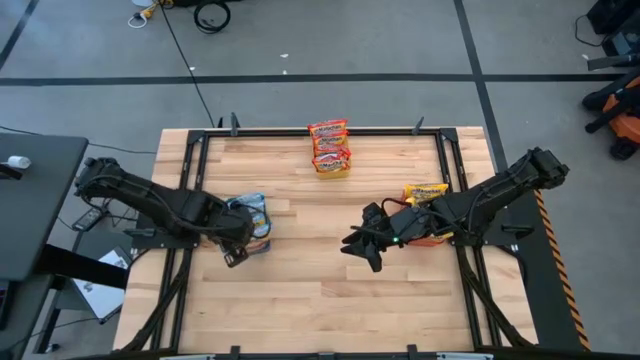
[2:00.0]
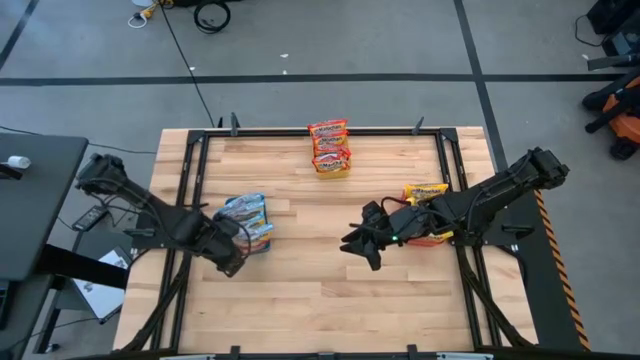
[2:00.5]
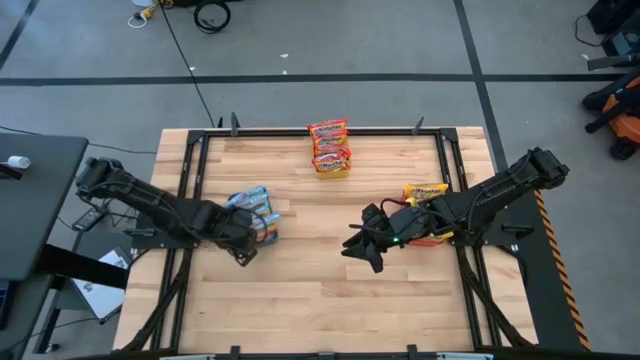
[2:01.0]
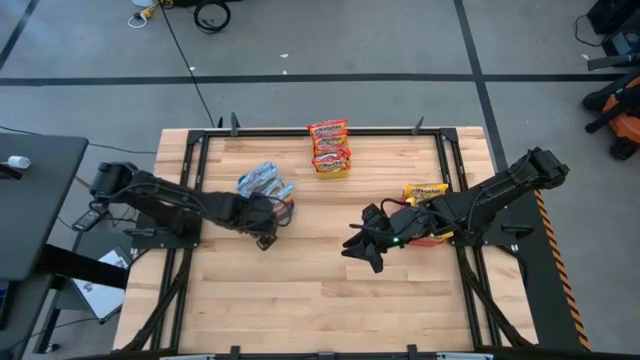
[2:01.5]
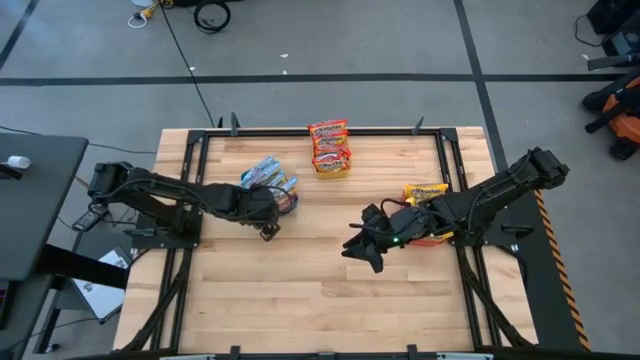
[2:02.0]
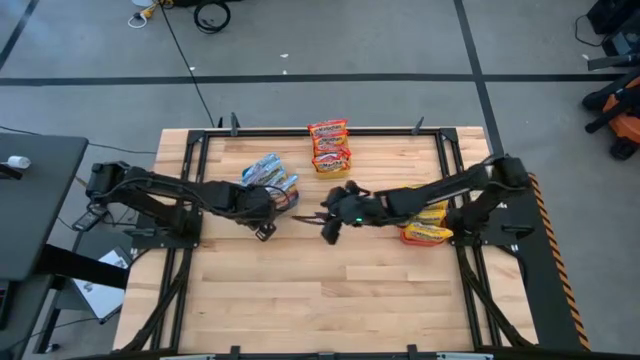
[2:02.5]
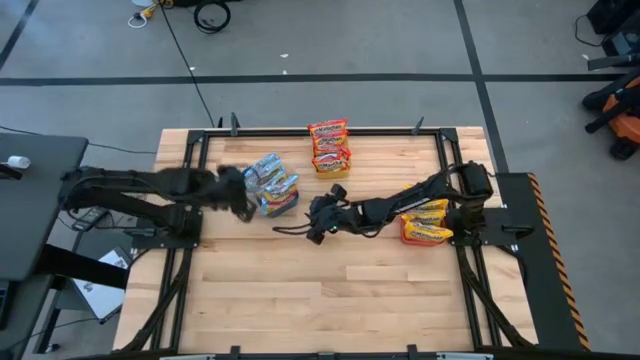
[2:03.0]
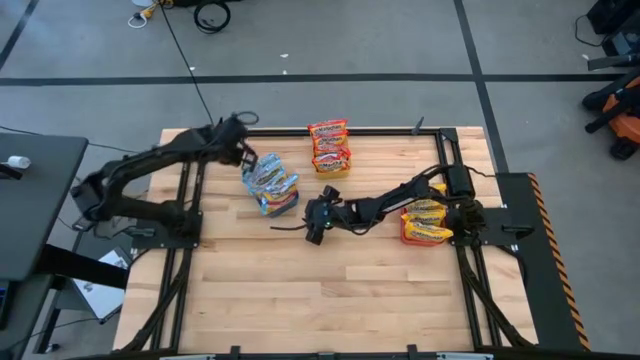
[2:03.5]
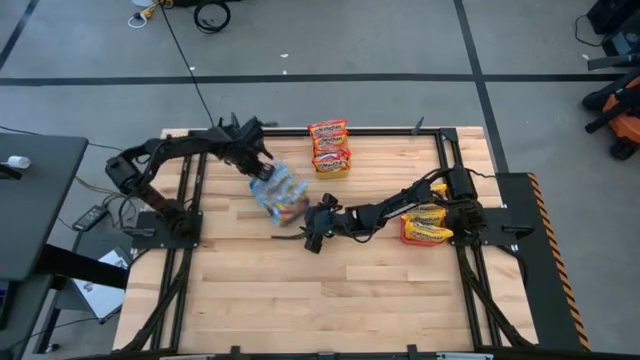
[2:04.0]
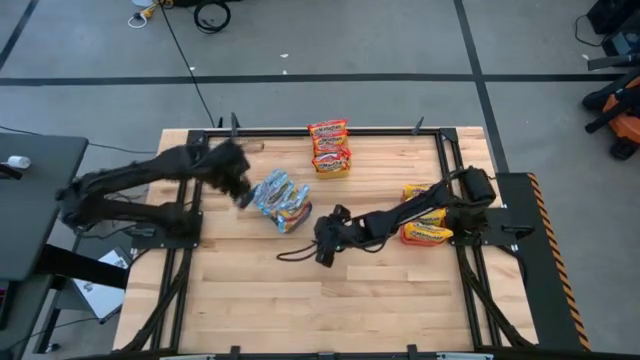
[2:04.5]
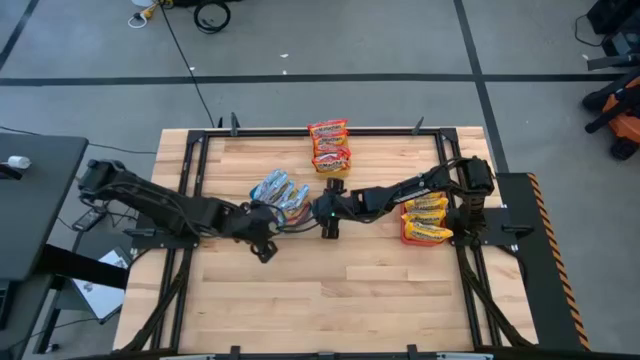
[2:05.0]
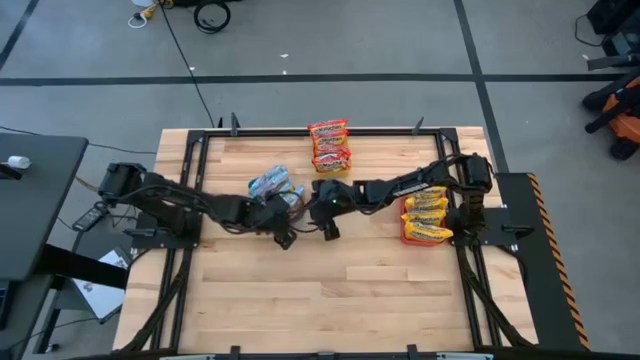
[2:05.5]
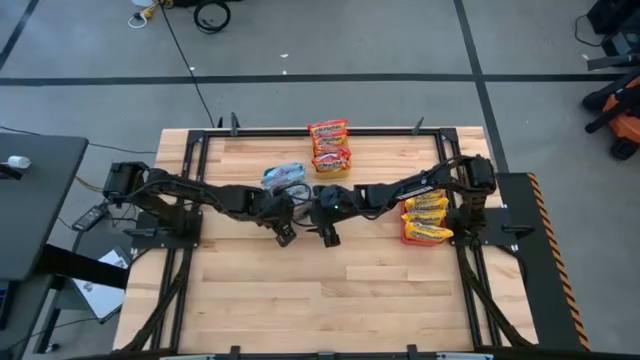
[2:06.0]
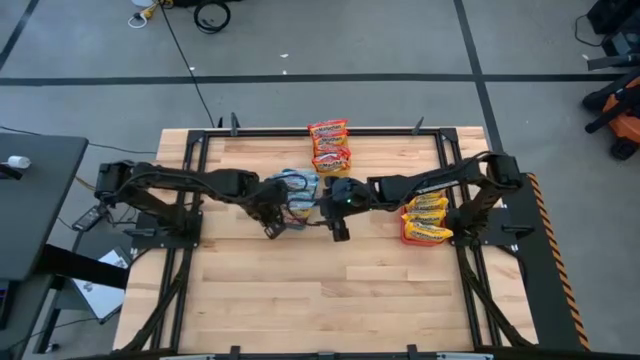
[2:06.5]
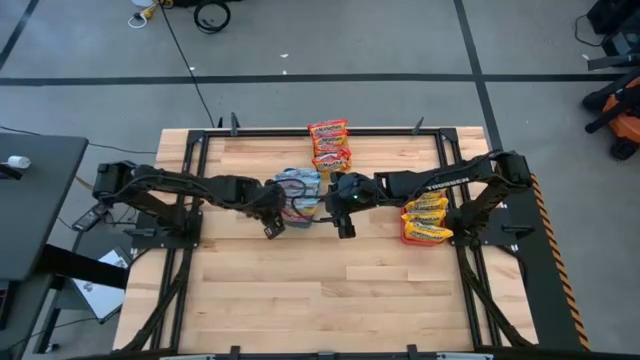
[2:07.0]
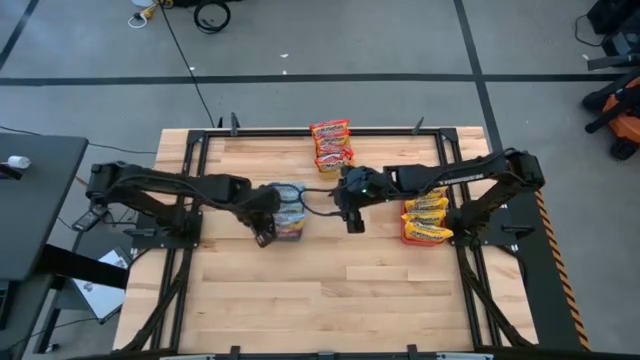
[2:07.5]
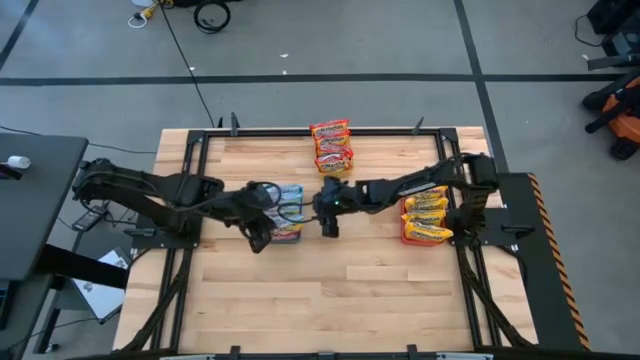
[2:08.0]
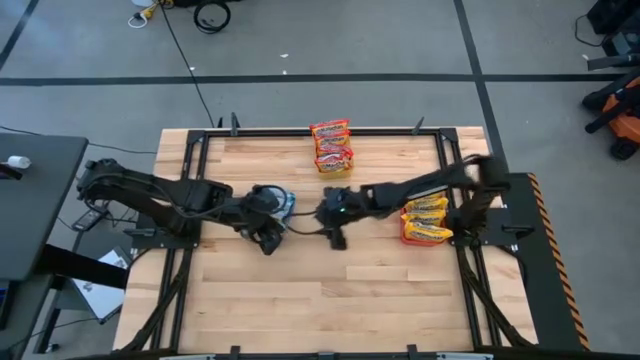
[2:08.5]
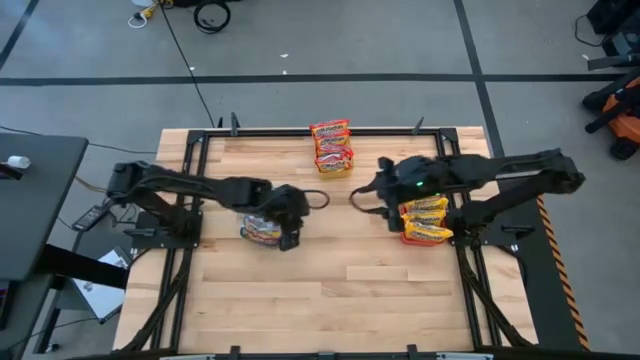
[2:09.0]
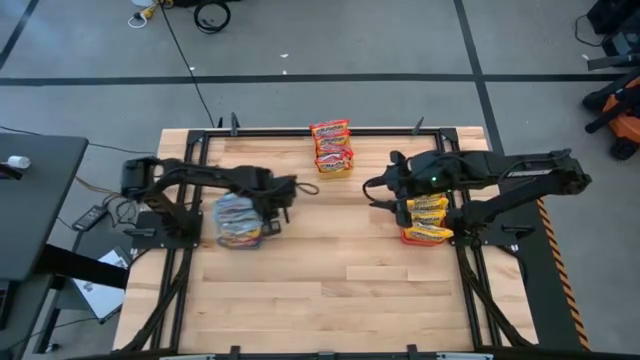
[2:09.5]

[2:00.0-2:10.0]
Task: Sort Maruchan noodles
Adjust the blue bin

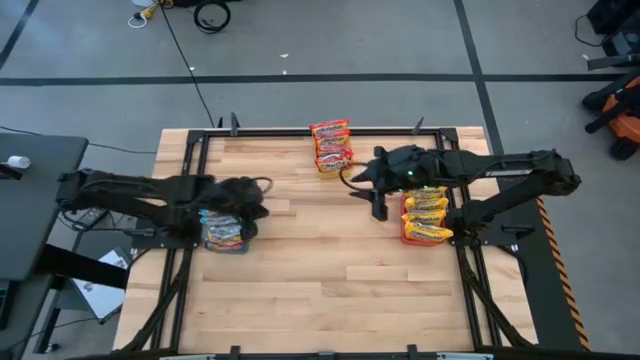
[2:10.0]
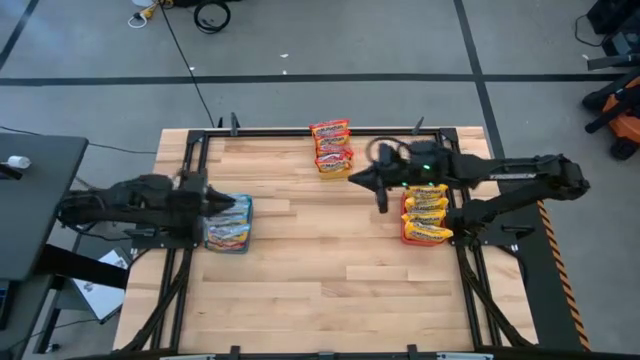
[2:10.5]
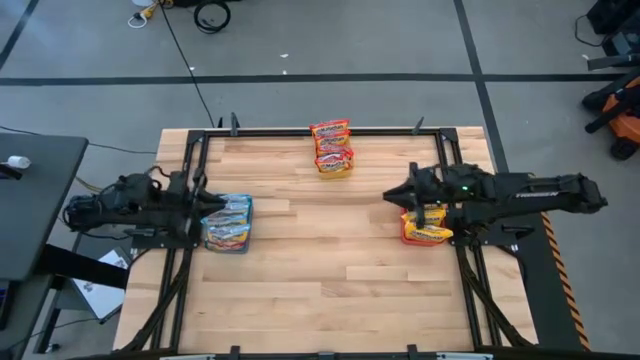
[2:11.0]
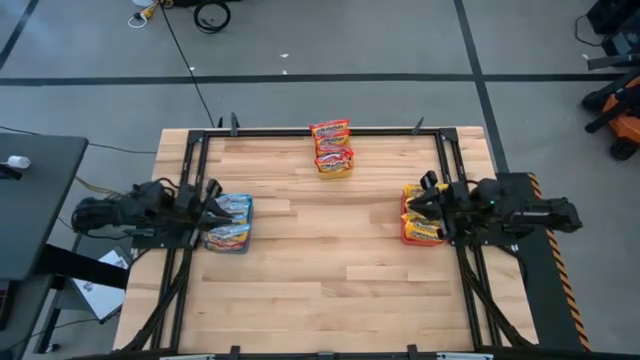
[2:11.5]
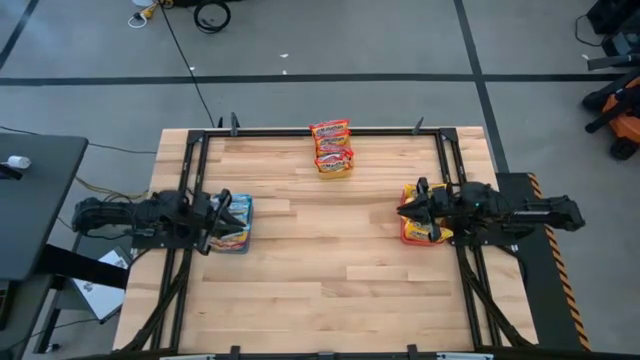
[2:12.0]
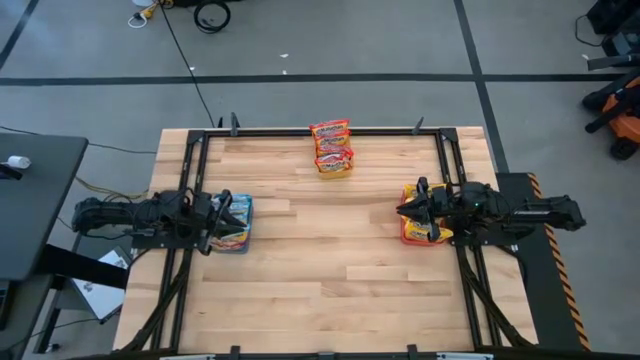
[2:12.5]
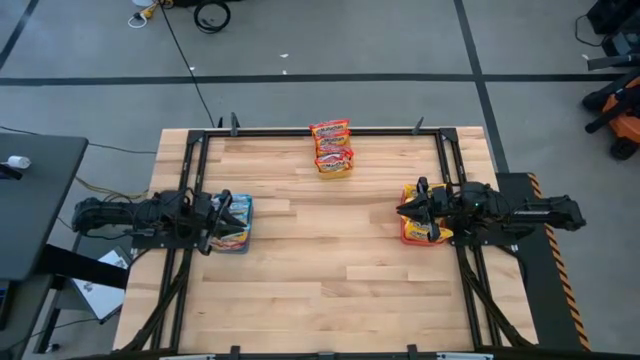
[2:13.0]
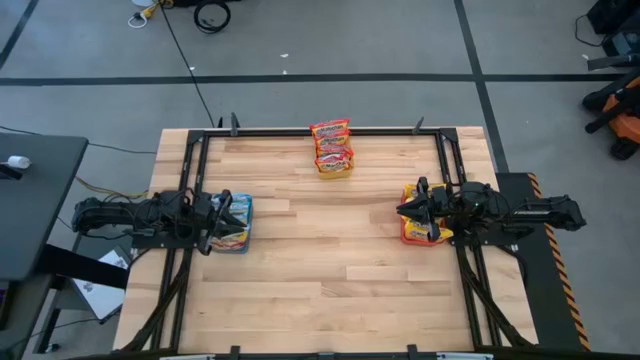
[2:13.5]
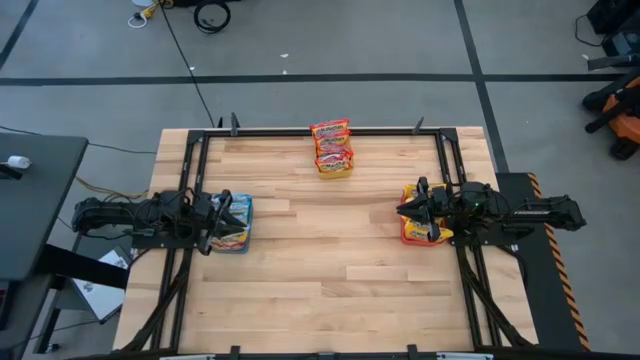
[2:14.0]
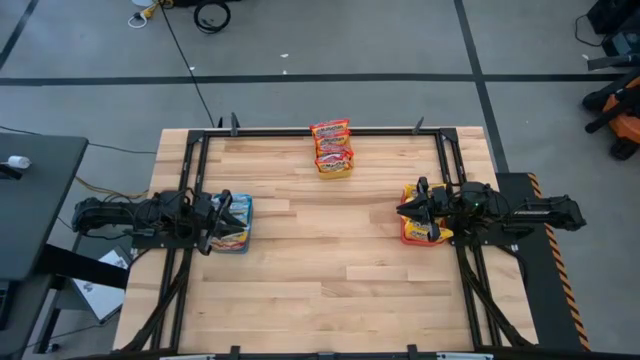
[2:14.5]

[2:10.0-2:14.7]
Return to Home Position

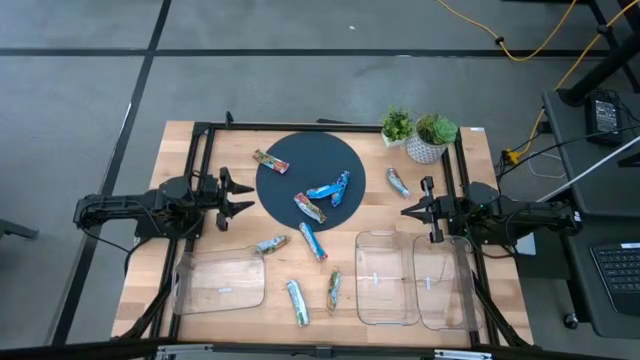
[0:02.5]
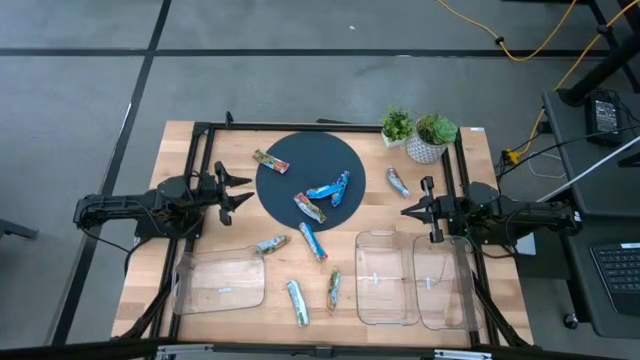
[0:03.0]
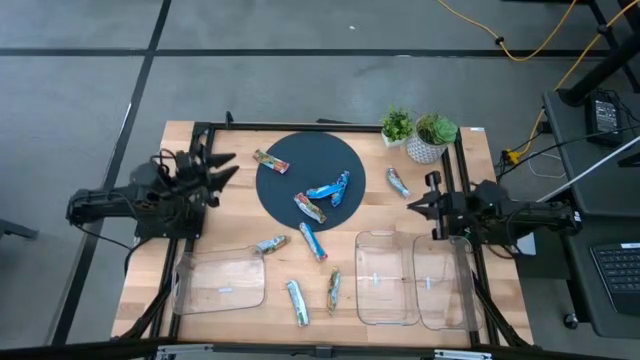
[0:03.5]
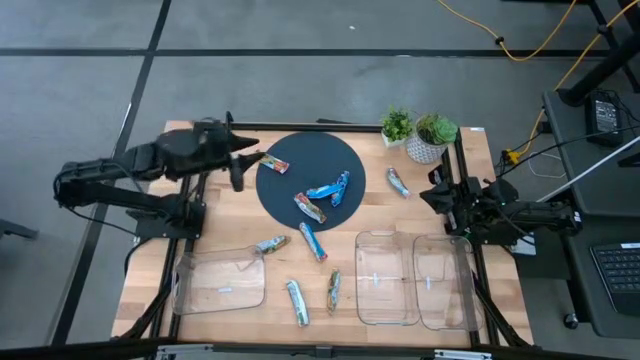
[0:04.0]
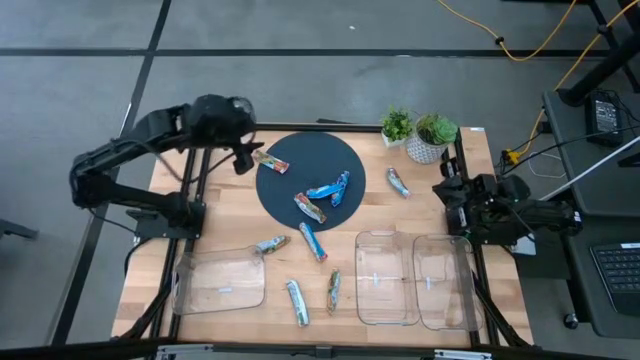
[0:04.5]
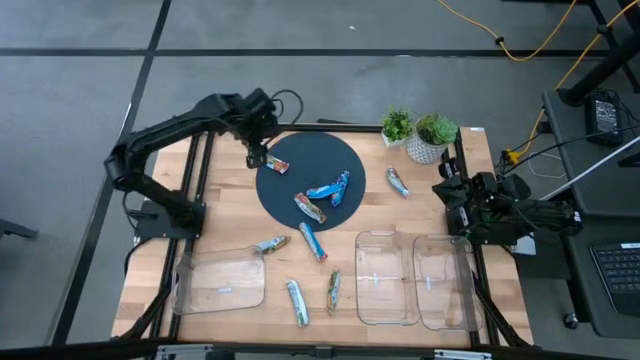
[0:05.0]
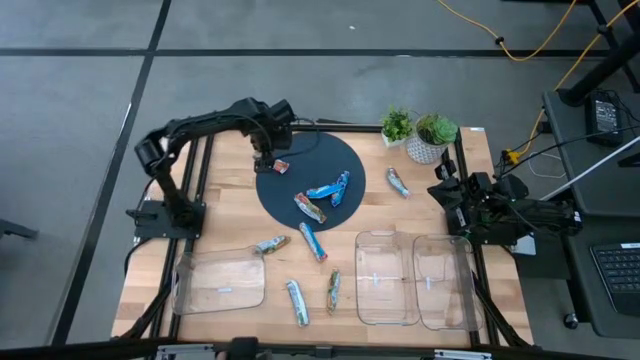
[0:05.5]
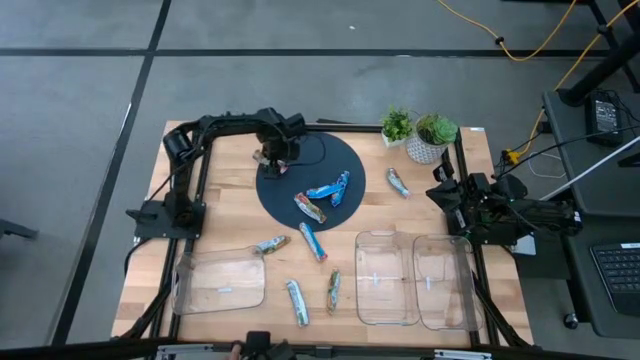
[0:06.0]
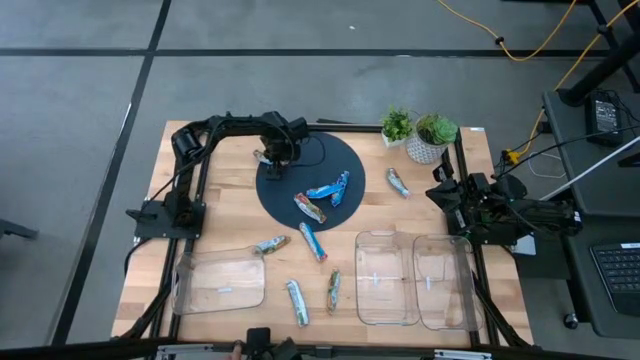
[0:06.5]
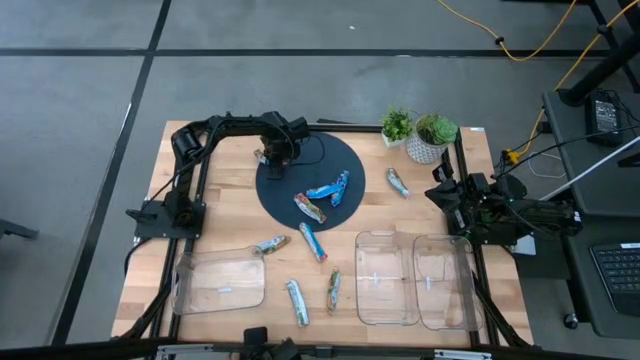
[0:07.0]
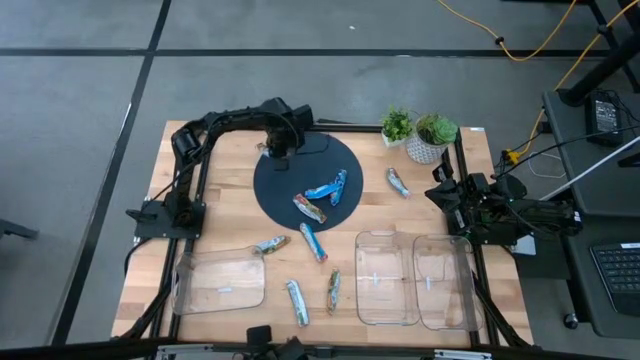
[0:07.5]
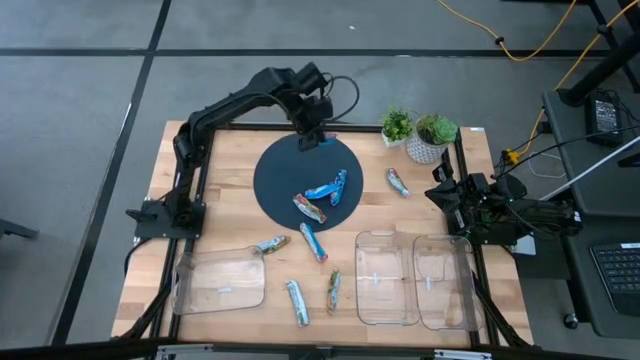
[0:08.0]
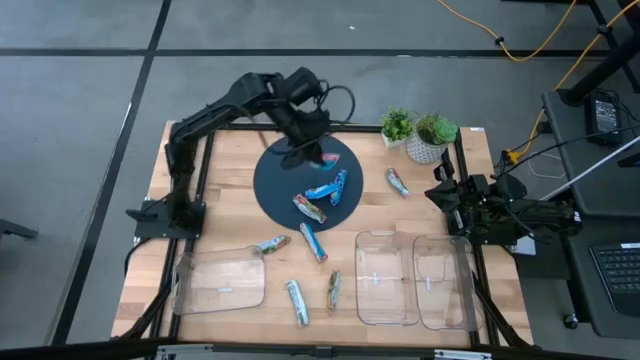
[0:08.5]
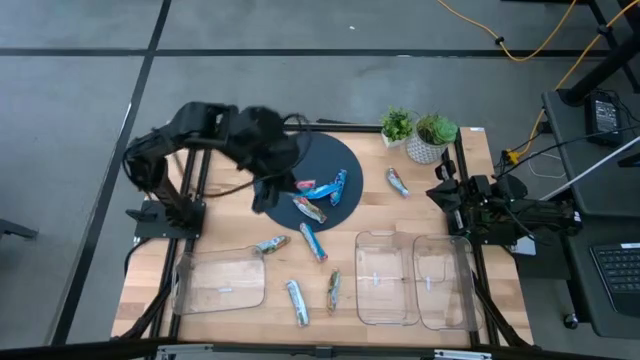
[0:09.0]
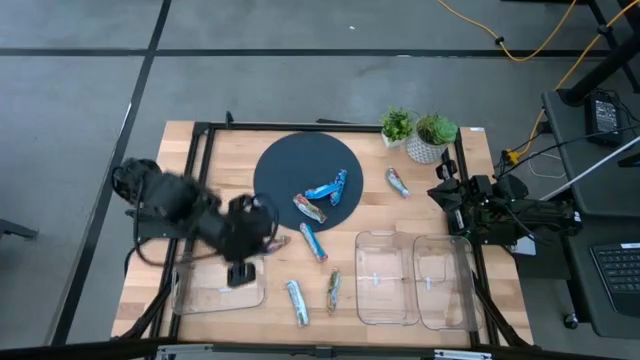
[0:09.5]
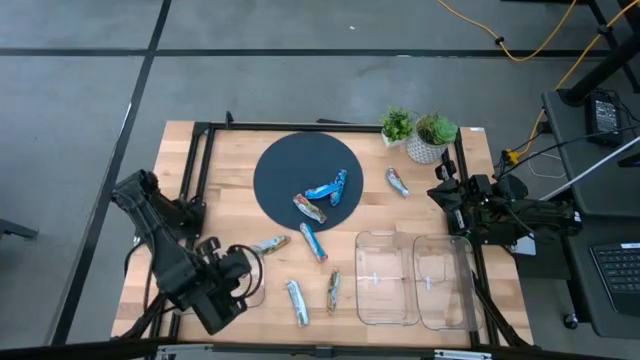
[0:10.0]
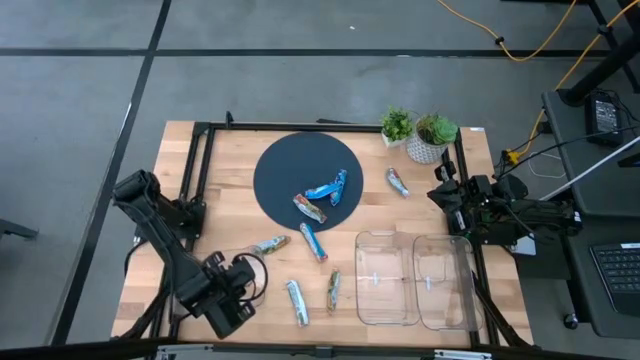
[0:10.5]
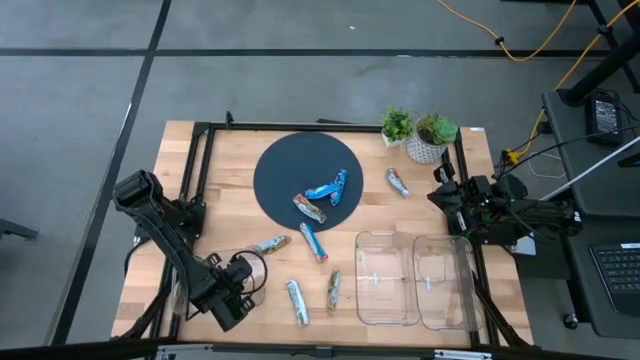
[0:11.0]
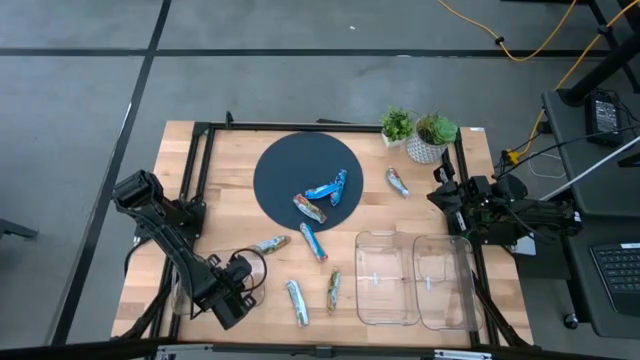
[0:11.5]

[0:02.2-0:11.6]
Task: Pick and place Granola Bars by type
Put the red granola bar into the left transparent bin
